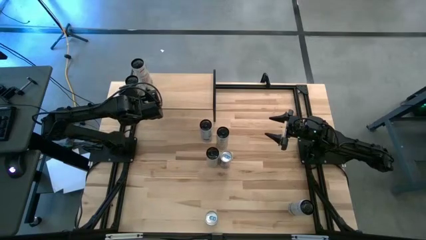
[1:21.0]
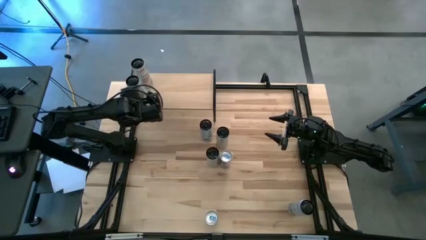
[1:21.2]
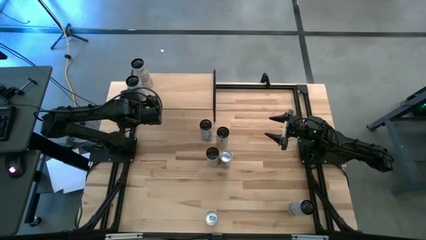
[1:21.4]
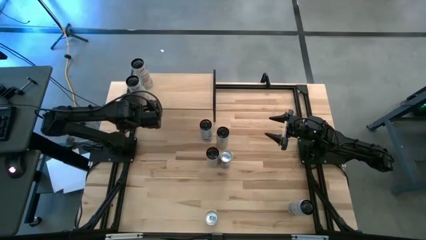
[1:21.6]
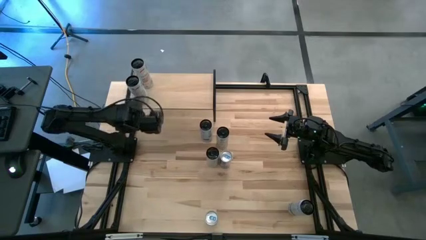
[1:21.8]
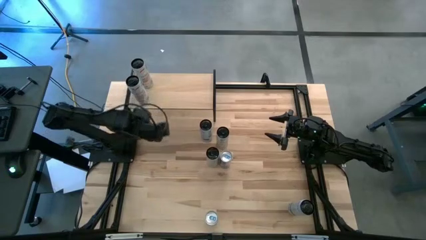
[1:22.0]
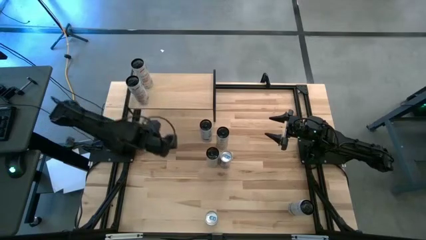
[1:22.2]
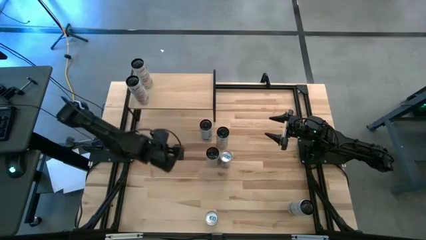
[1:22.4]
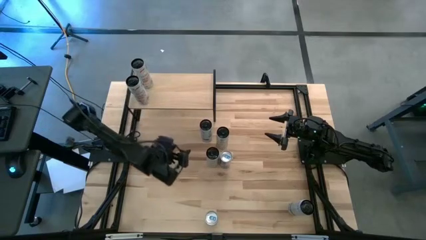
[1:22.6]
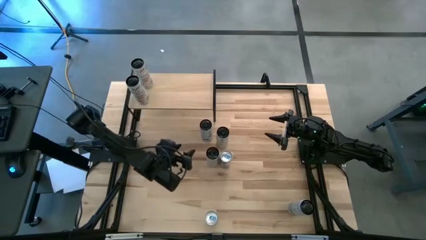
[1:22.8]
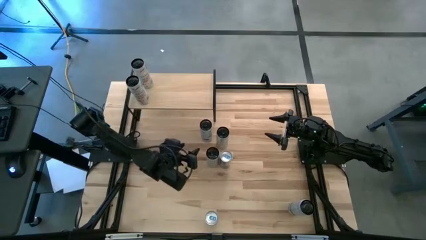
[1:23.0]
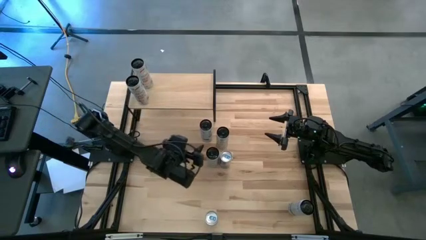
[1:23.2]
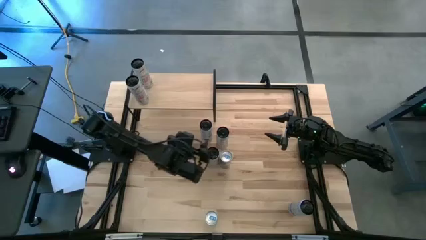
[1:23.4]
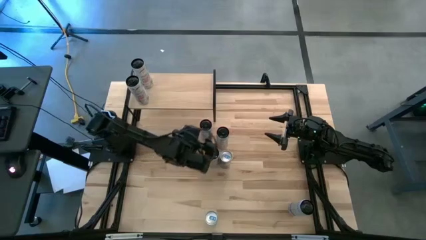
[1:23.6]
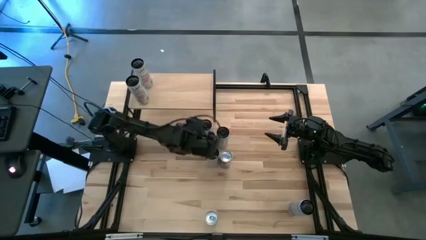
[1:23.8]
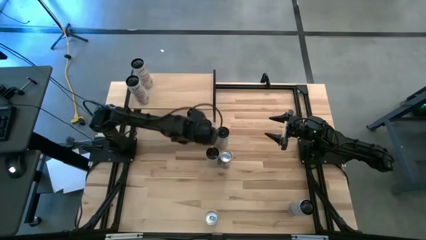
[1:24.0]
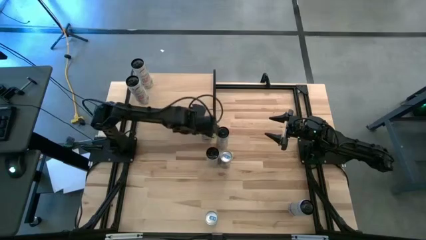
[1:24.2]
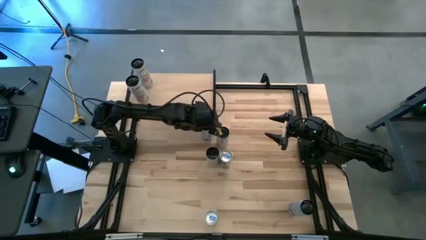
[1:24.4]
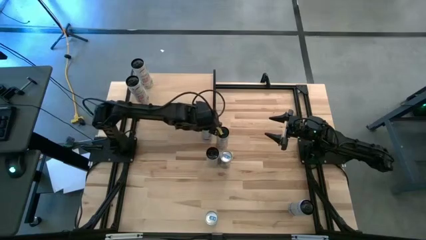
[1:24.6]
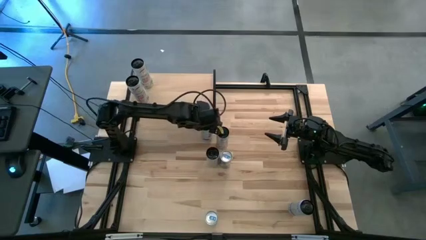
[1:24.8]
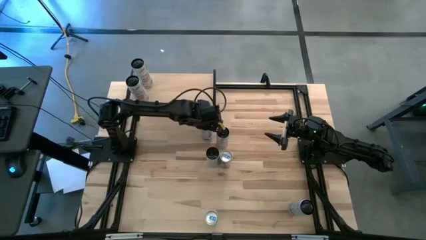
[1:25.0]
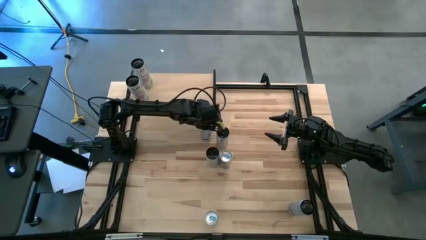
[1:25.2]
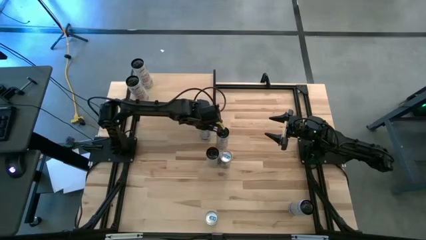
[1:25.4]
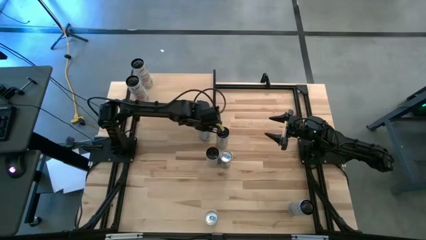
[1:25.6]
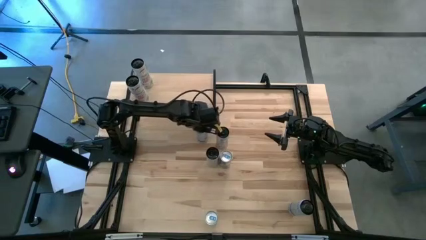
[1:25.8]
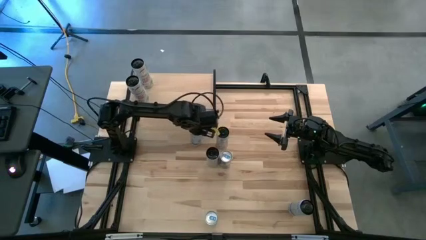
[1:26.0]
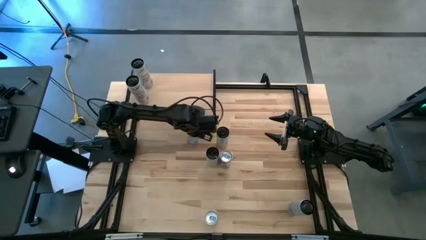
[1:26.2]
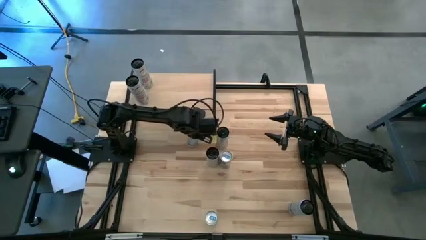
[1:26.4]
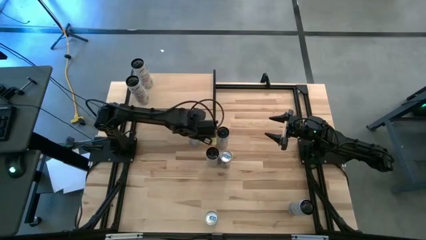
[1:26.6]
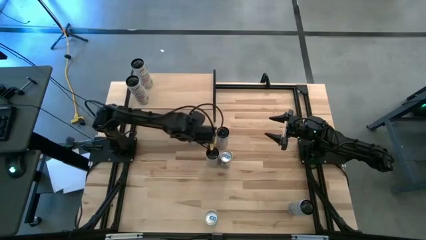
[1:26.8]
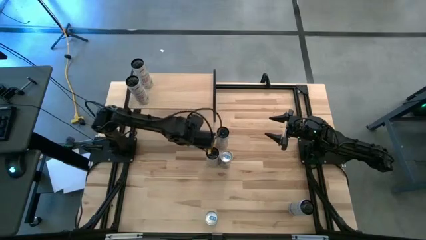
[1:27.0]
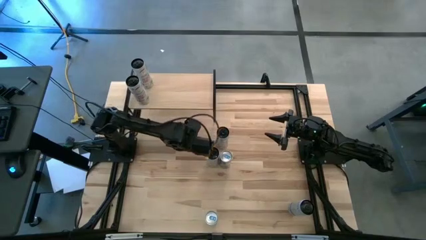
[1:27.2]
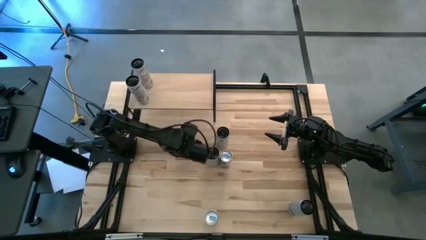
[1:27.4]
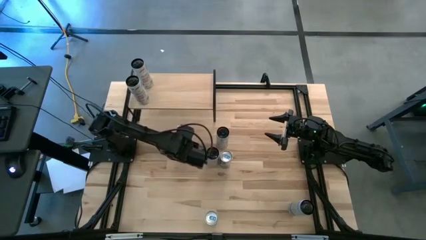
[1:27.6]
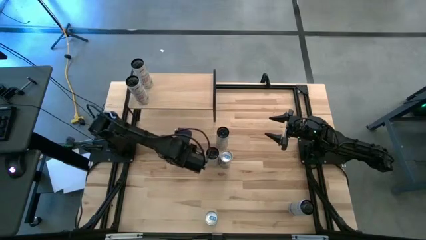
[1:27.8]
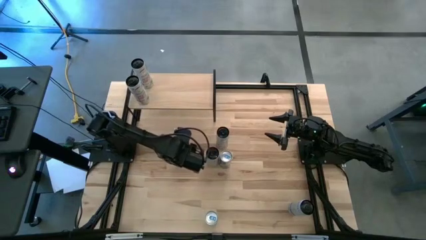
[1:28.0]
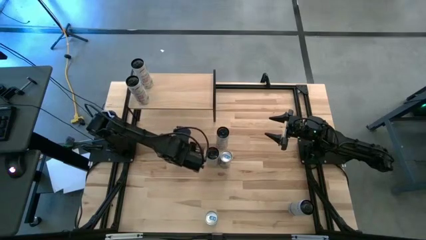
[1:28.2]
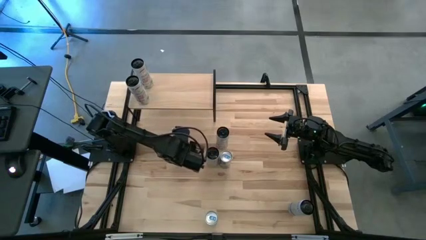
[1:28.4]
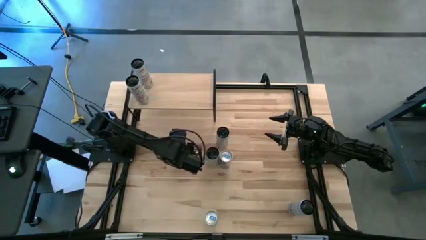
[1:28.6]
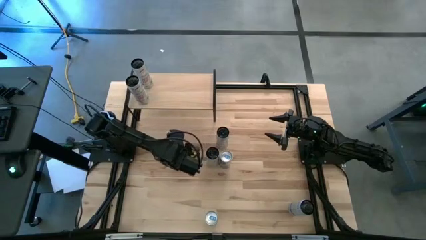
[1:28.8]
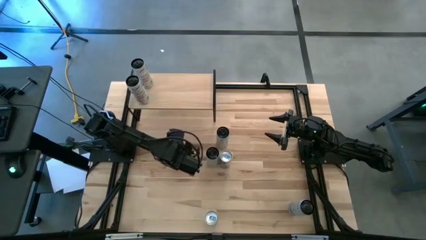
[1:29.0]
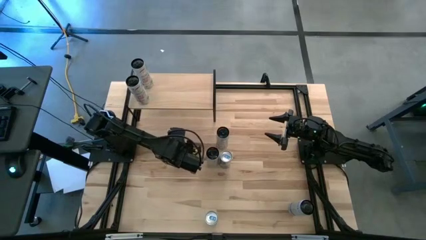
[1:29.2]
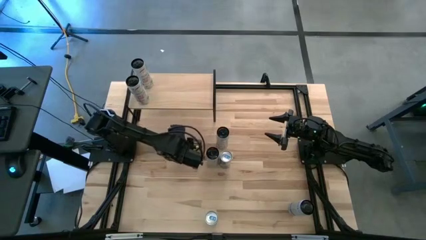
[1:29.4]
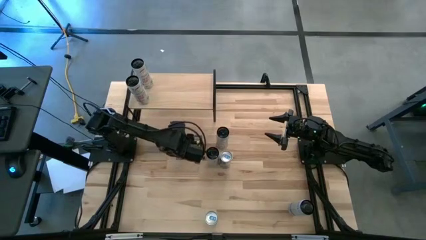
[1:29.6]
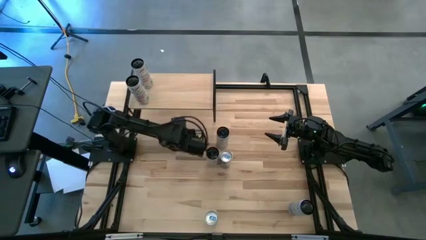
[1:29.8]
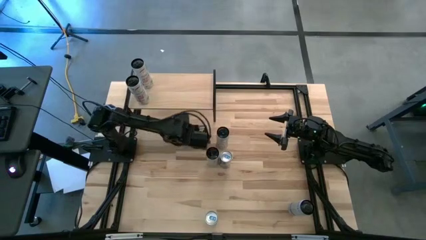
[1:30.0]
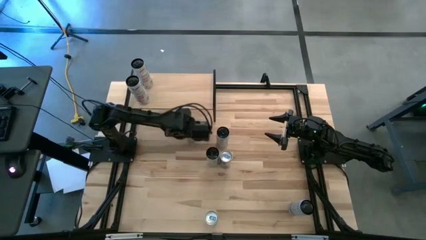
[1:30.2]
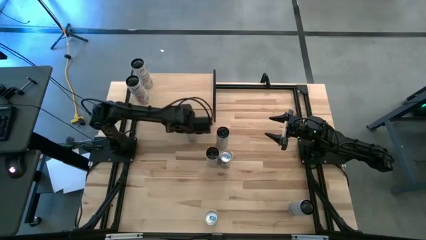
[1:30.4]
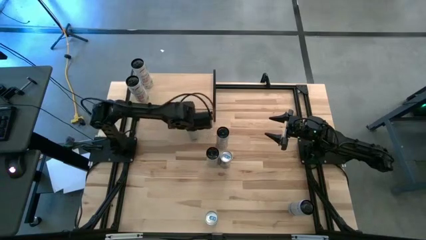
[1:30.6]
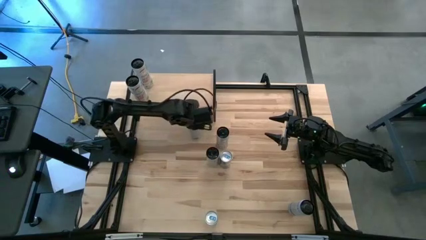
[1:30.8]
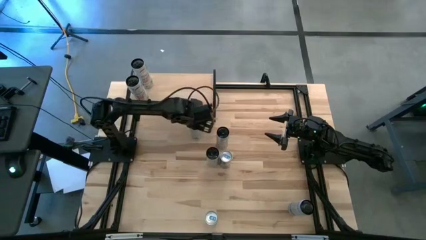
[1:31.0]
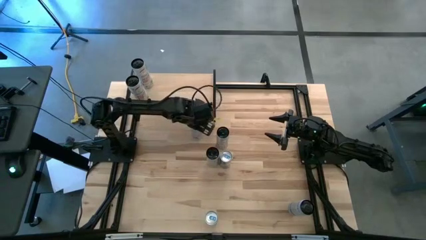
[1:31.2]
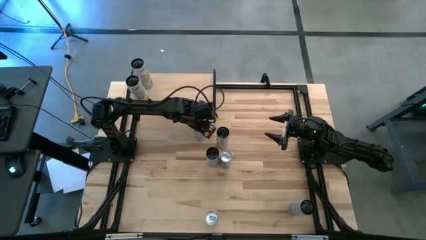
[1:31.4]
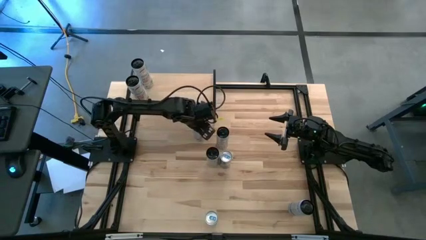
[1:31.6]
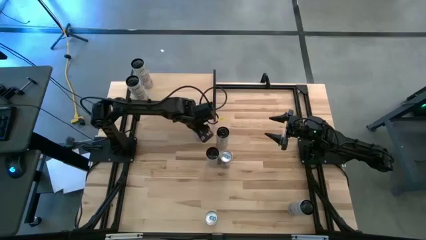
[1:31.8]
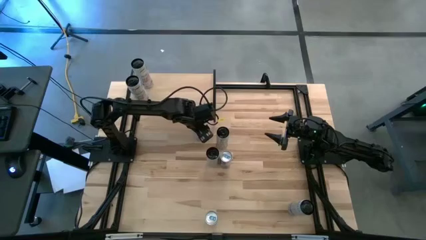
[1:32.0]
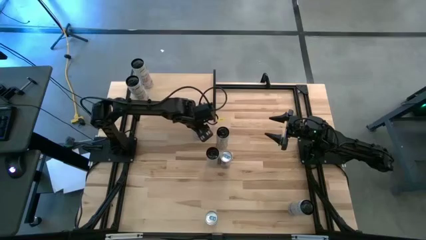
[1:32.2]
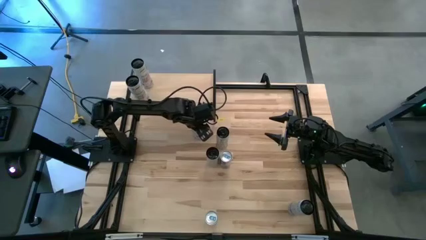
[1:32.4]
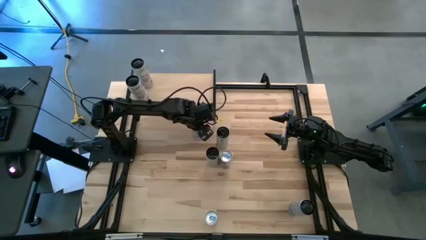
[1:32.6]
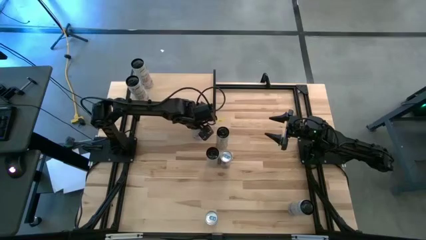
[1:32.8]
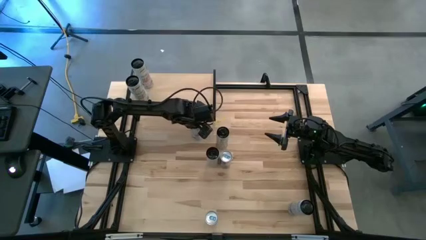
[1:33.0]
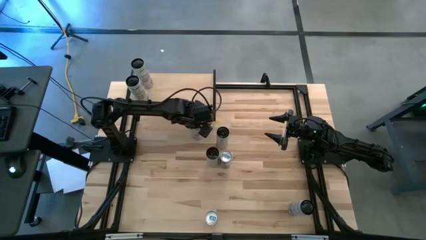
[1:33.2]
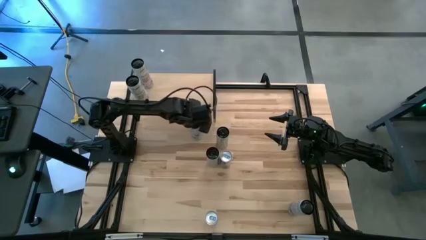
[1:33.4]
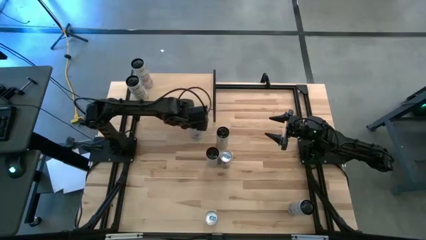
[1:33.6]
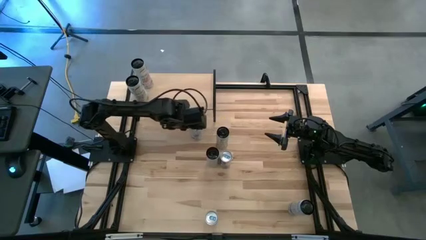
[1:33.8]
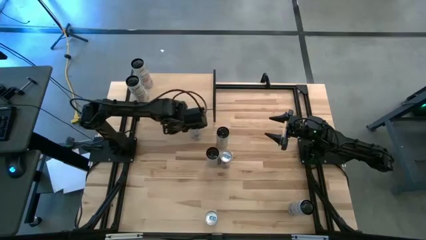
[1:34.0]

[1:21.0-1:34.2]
Task: Place canned beverage on shelf
Put the top white blue soda can on the shelf
